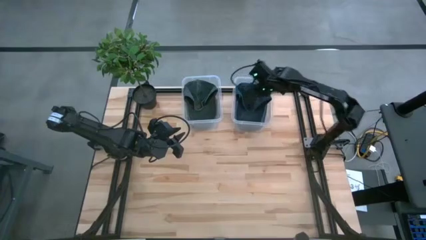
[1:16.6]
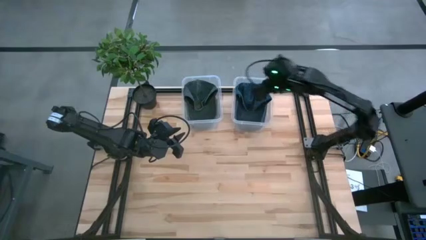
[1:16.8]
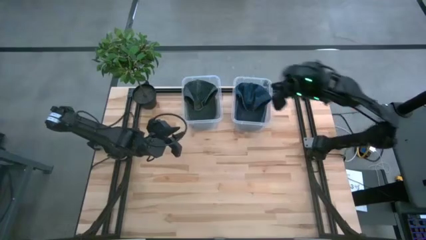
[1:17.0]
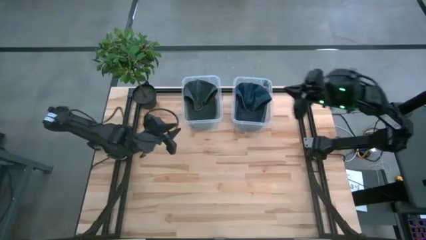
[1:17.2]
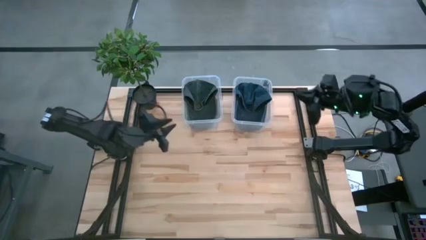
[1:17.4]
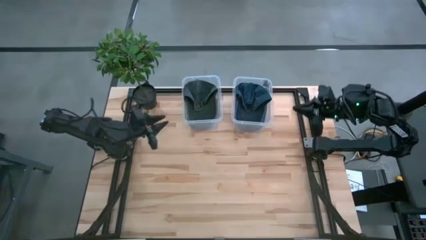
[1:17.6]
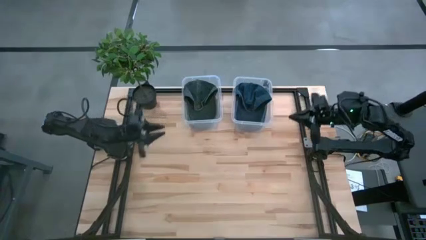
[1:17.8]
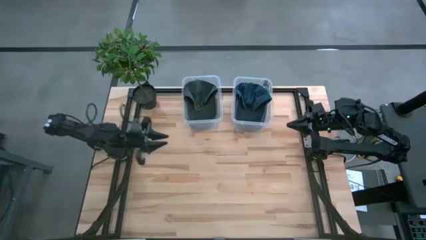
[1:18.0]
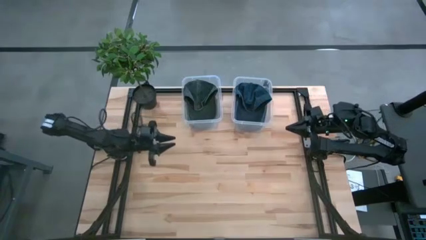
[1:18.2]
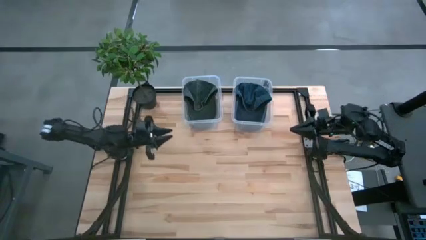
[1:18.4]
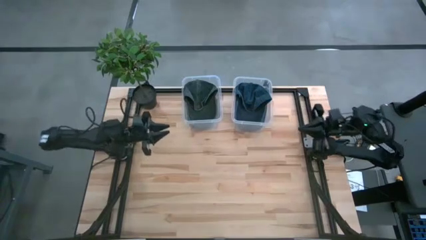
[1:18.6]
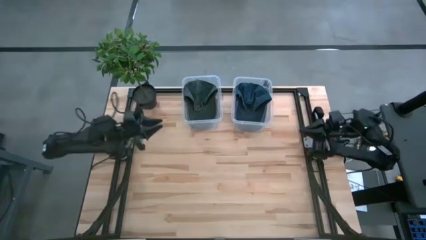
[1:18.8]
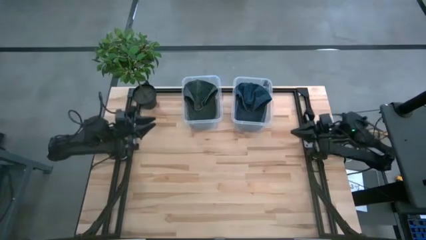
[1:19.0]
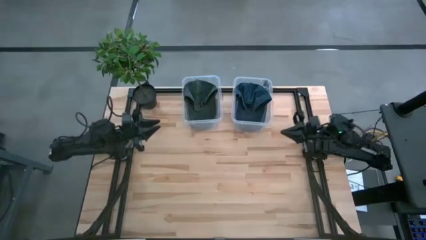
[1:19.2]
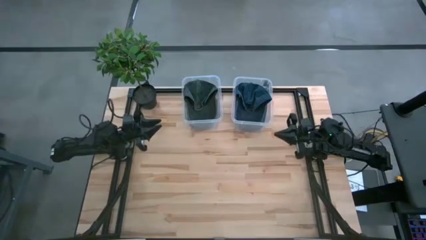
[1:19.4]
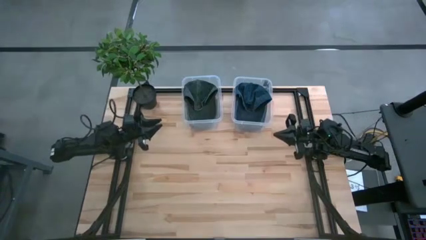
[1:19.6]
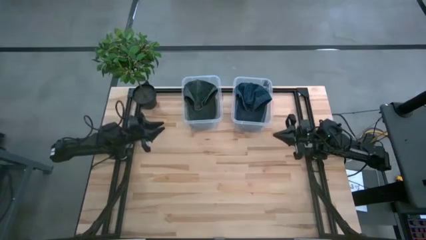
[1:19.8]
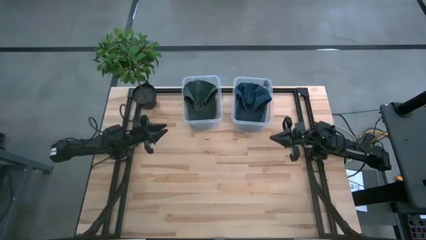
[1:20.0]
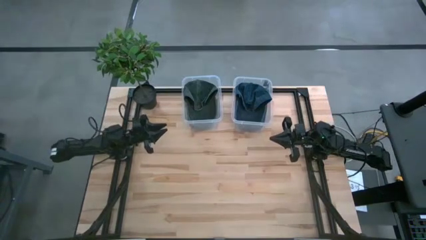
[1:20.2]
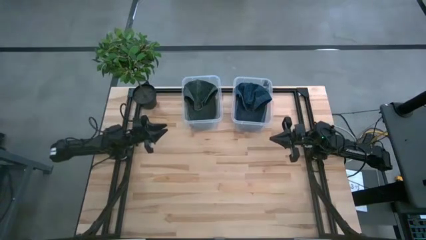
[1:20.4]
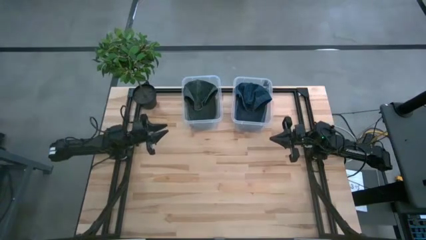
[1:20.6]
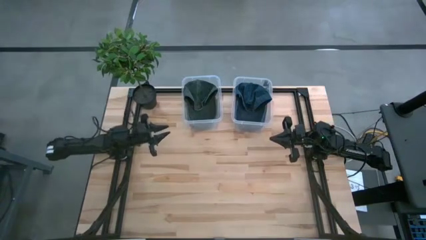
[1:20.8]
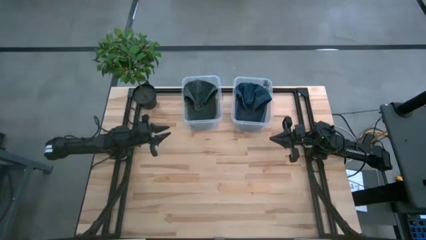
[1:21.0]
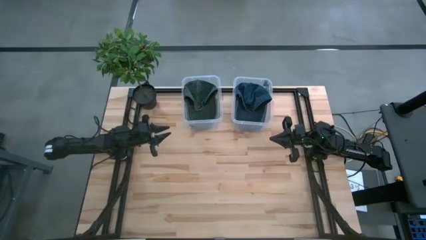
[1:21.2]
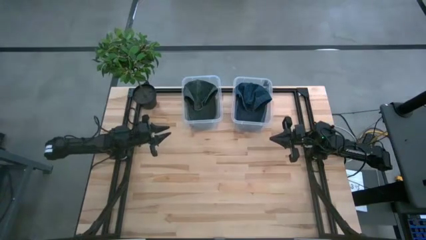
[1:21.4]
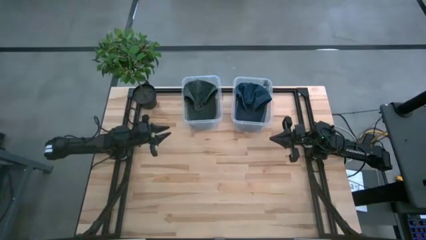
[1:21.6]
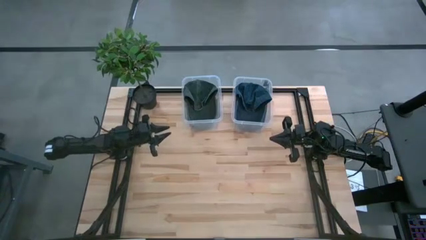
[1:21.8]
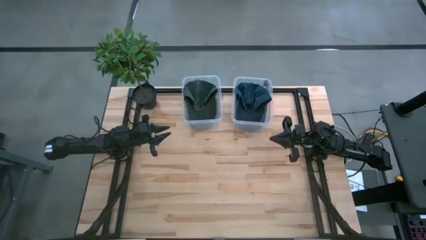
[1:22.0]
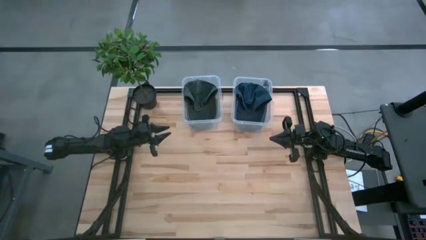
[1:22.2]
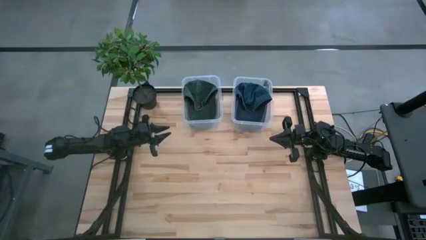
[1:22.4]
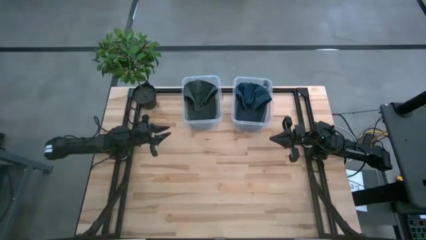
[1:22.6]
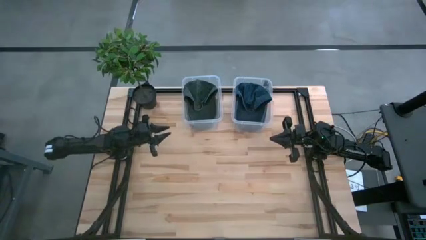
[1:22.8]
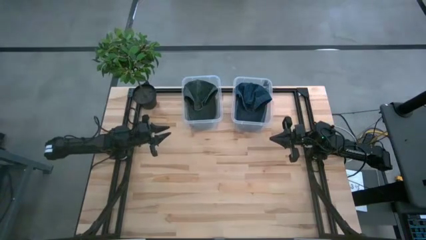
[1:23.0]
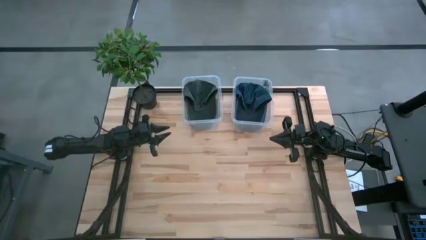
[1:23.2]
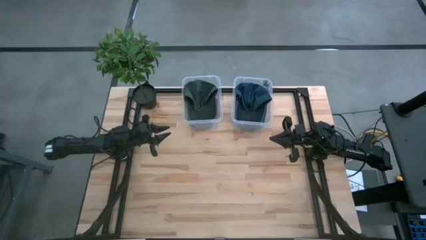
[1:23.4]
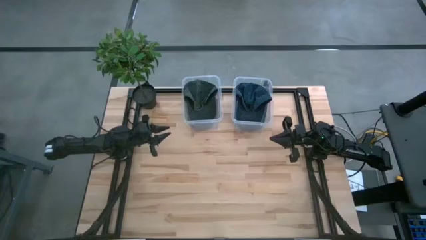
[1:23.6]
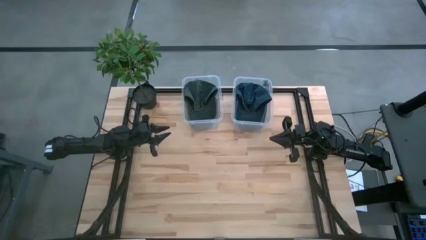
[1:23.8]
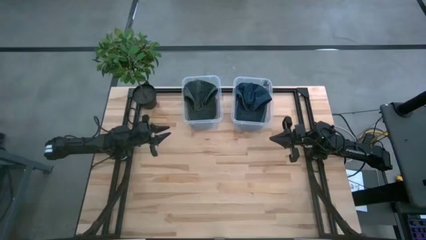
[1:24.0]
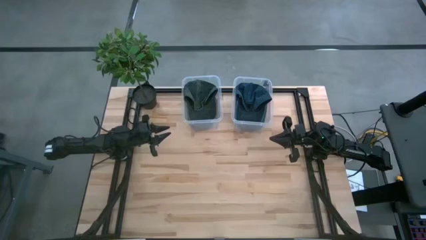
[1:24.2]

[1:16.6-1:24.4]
Task: Pick & Place hat
Return to Home Position

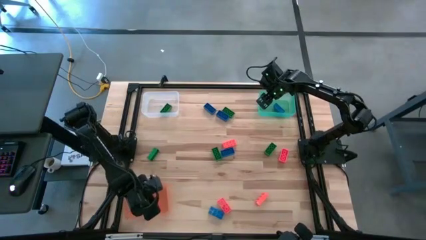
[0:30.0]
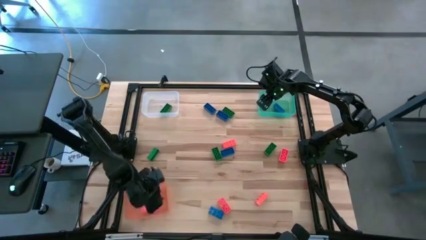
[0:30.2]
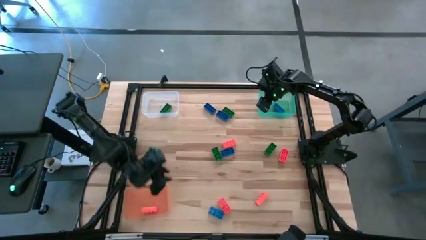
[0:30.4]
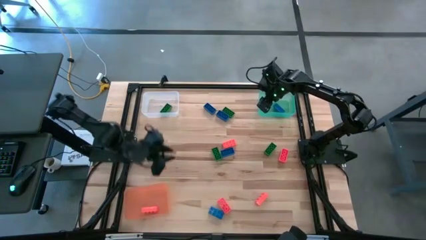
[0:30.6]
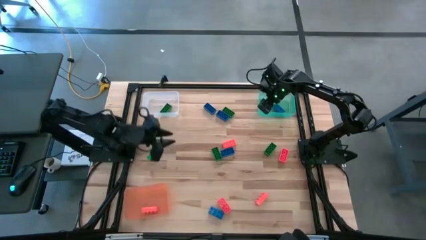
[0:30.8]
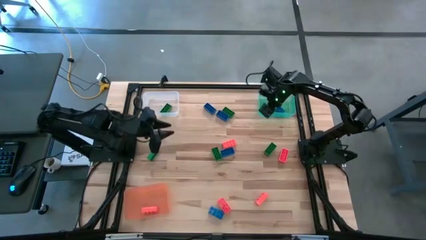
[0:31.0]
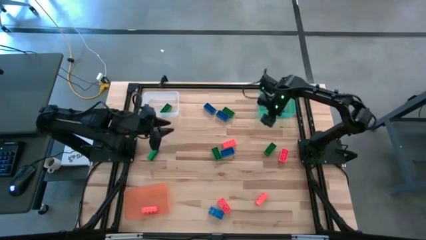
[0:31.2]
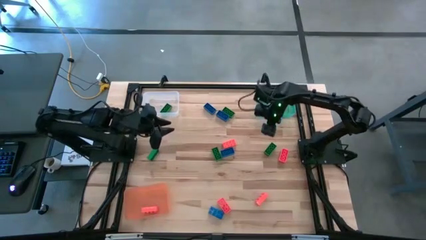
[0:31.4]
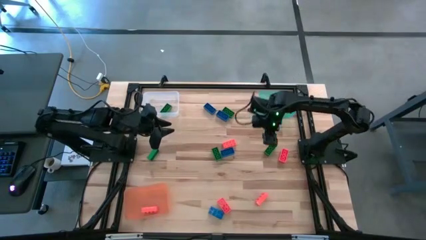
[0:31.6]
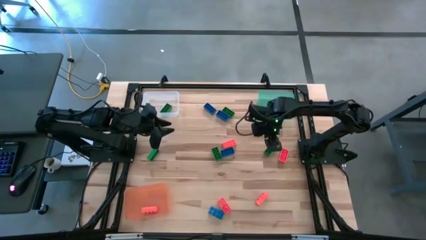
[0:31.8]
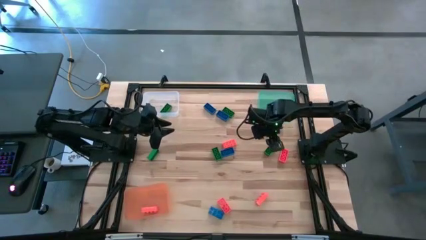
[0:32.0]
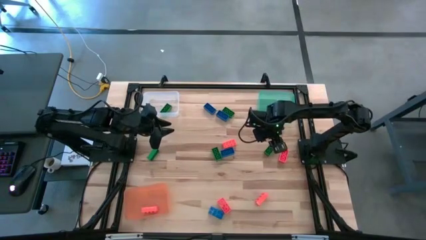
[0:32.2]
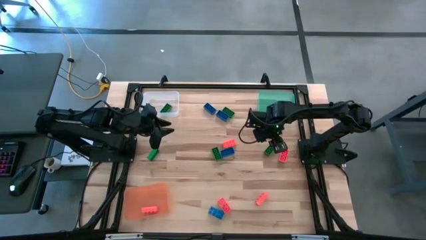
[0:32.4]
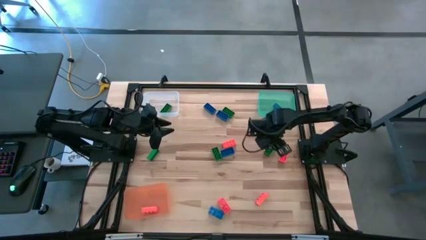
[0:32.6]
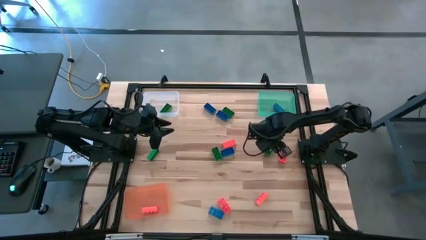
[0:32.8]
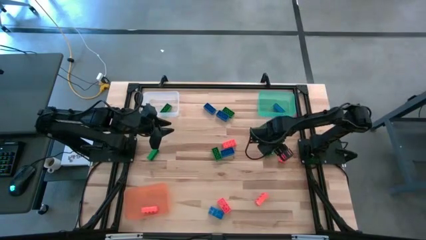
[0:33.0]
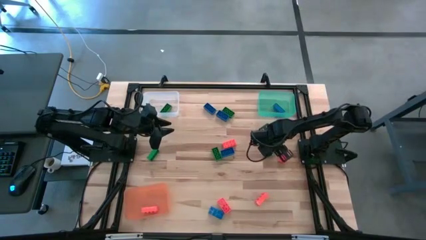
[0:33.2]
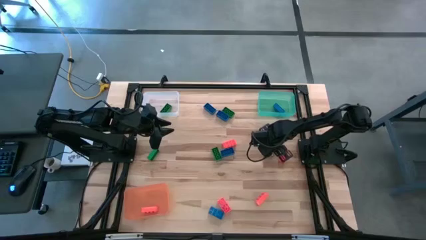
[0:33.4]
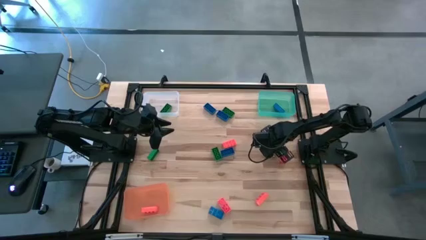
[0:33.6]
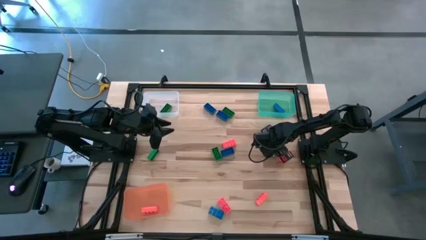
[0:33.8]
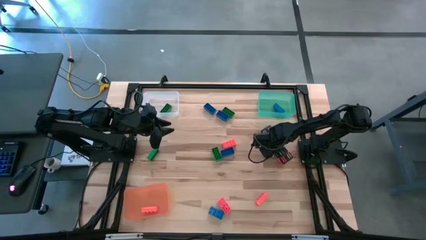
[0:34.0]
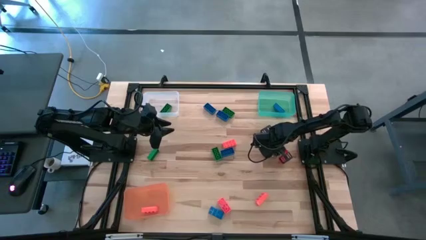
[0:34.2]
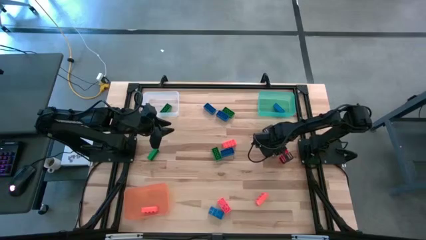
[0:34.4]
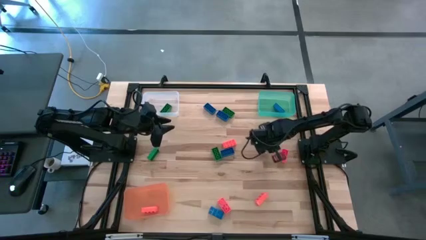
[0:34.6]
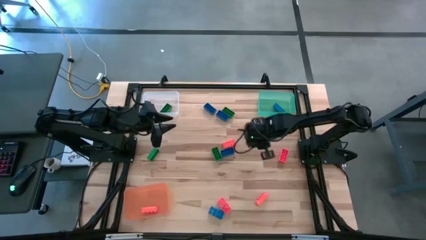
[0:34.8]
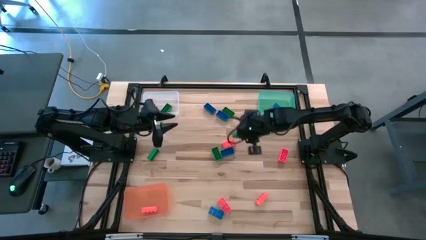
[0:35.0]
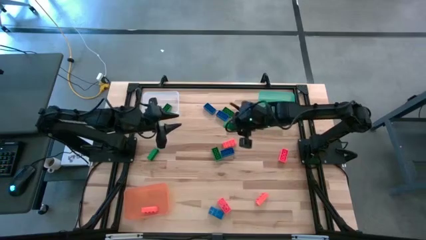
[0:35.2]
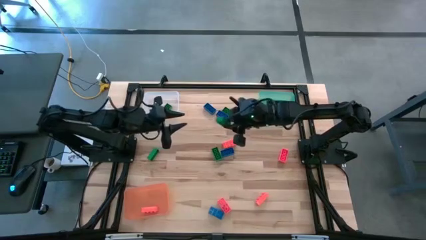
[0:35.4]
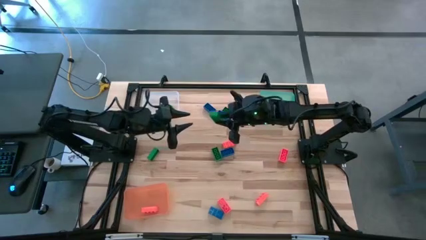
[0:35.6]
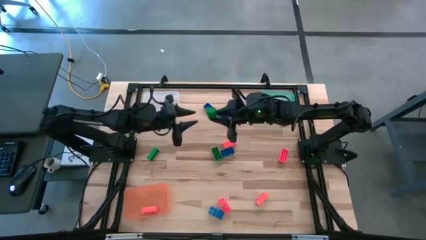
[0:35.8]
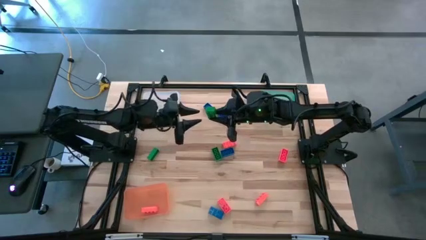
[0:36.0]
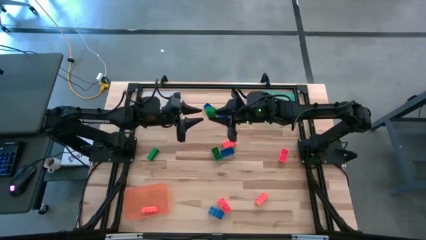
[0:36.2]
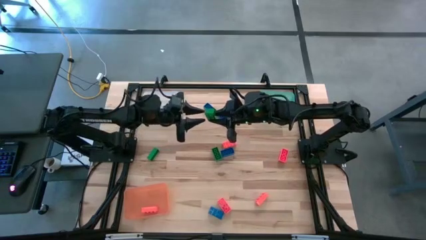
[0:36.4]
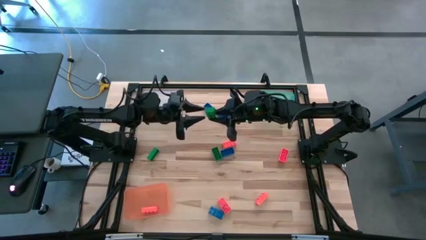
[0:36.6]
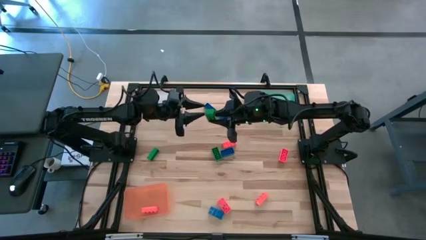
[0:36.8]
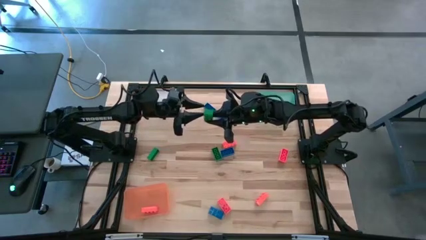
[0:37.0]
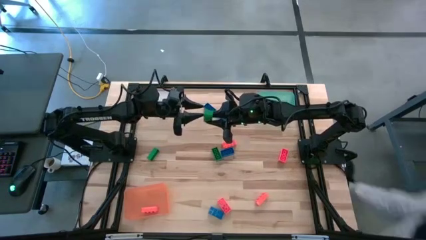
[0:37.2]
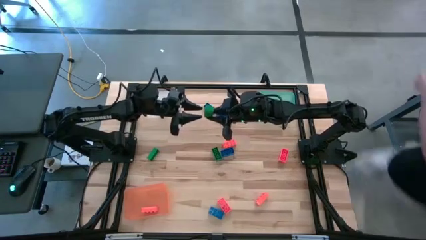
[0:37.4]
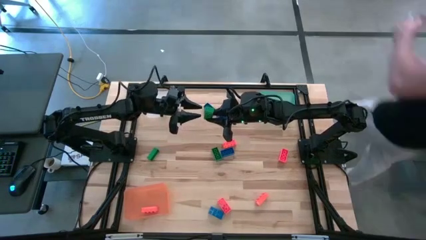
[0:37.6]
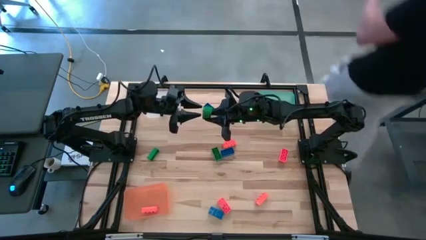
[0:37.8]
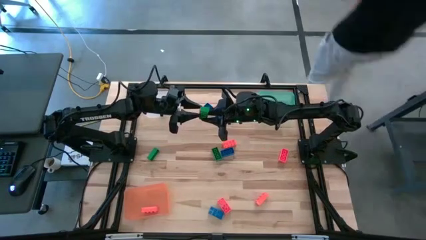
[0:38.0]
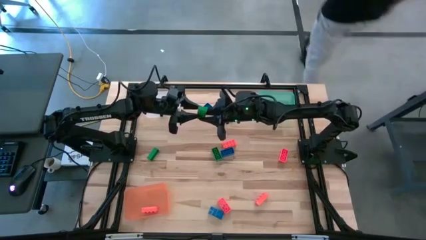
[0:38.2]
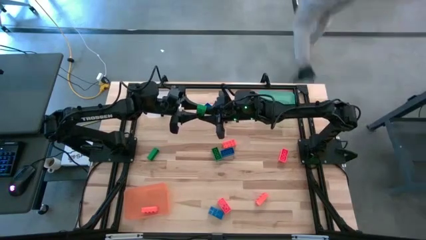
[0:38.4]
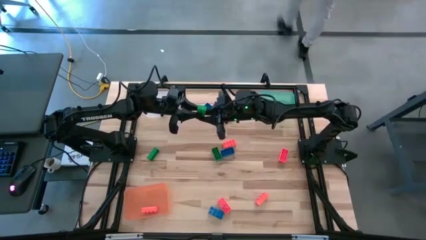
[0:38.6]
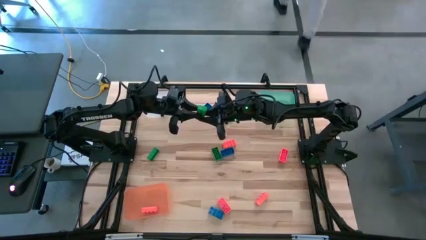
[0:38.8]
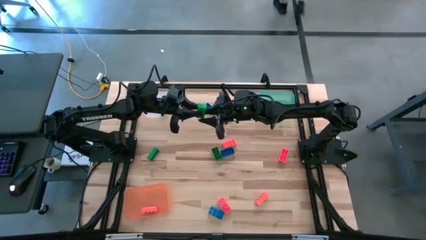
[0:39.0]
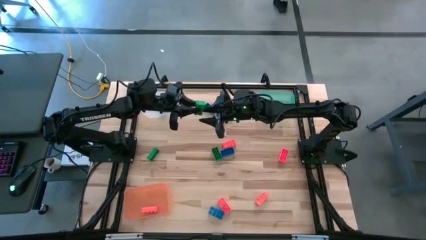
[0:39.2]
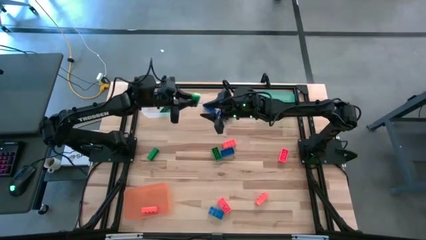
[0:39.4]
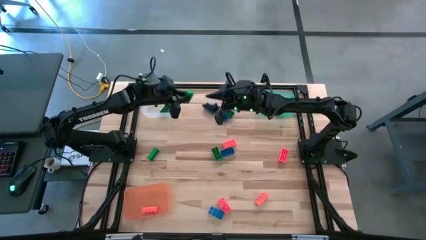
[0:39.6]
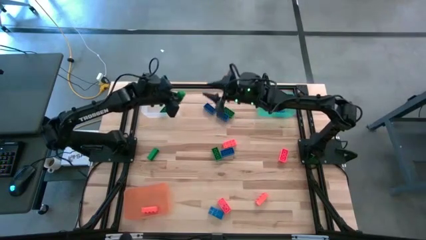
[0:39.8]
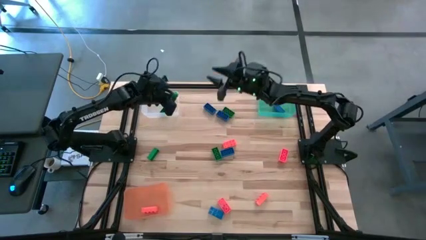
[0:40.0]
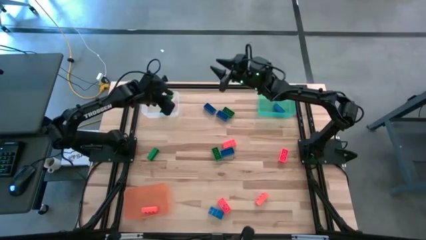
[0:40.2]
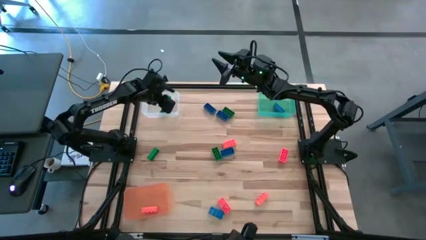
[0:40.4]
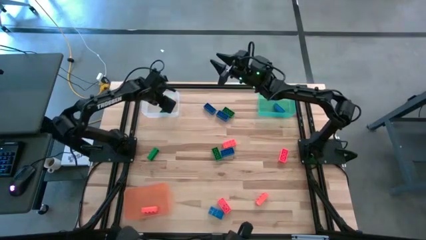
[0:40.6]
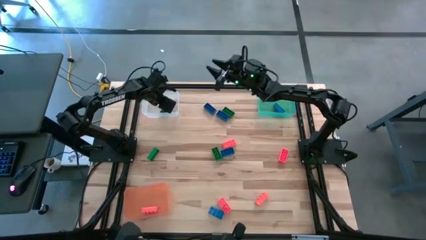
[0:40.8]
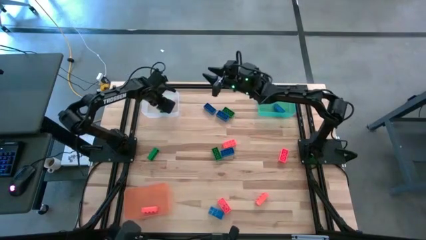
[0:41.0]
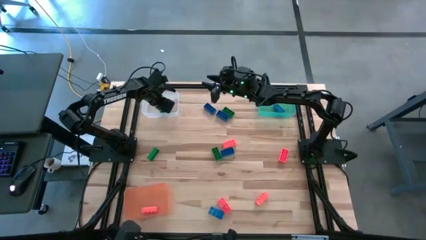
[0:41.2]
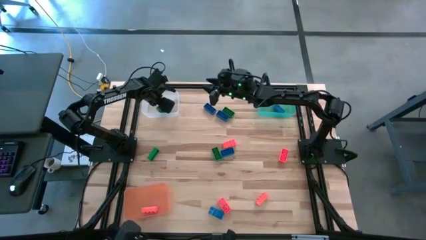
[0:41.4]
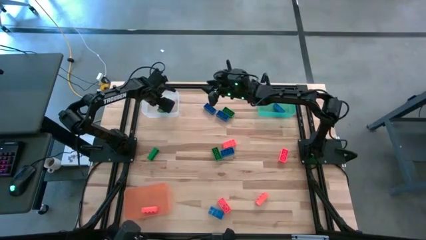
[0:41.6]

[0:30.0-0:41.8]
Task: Sort & place blocks by color
Put the green game piece into the transparent bin
